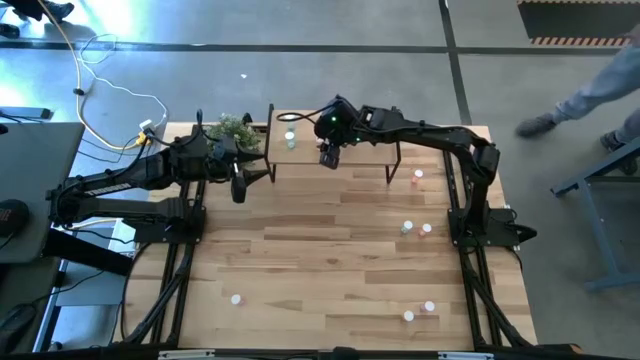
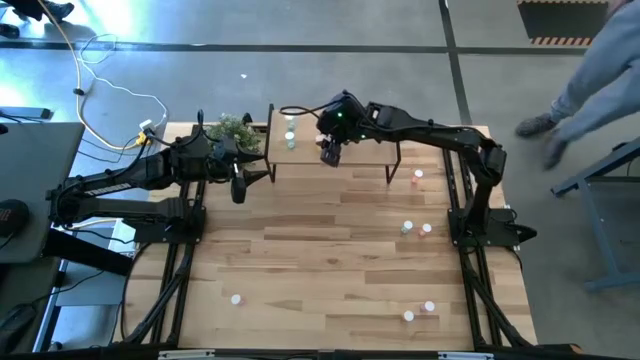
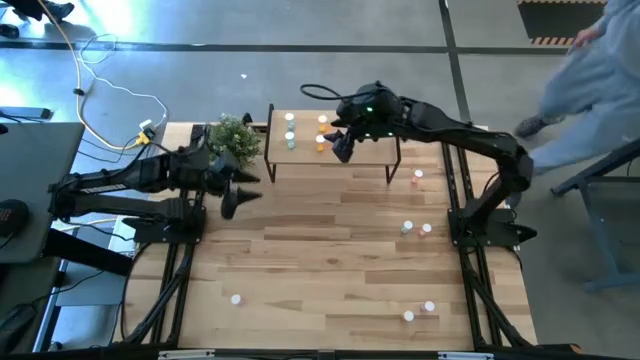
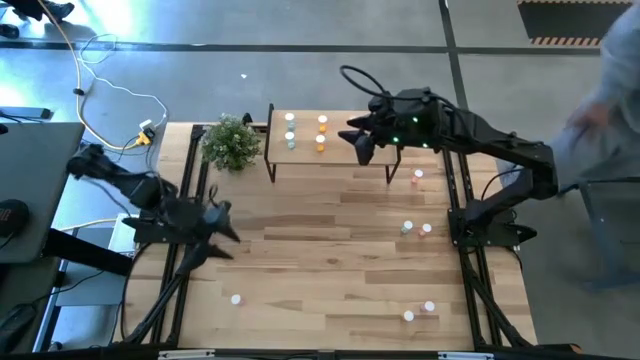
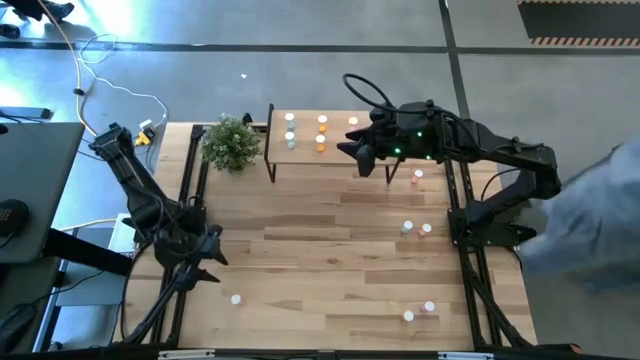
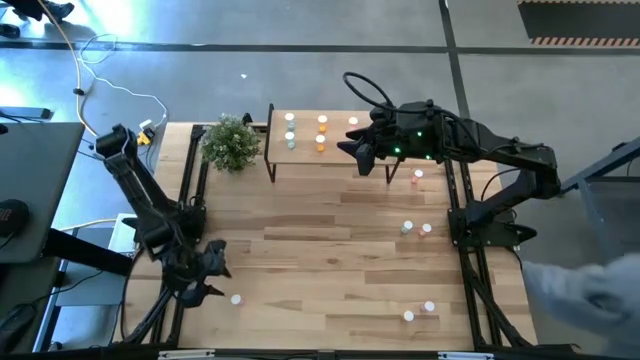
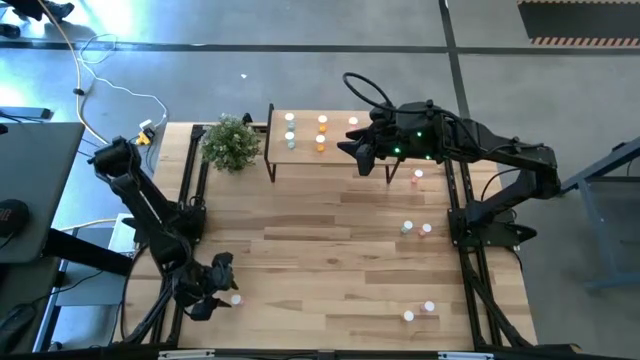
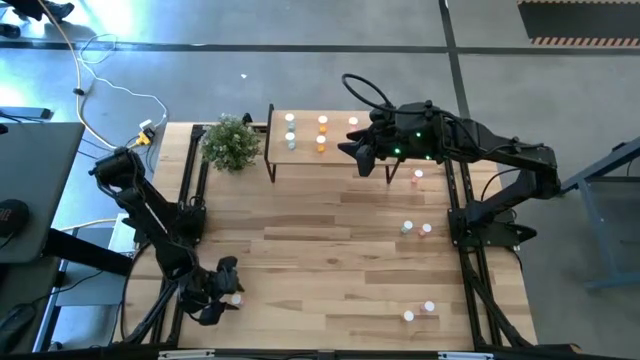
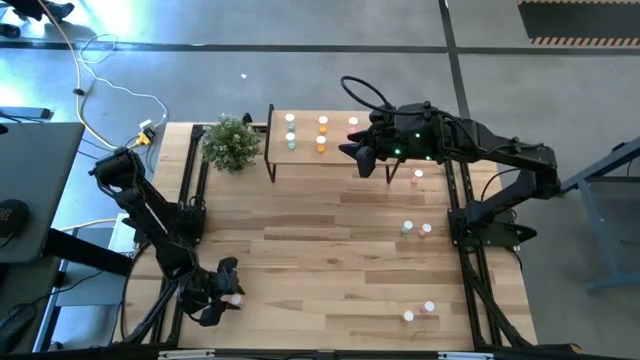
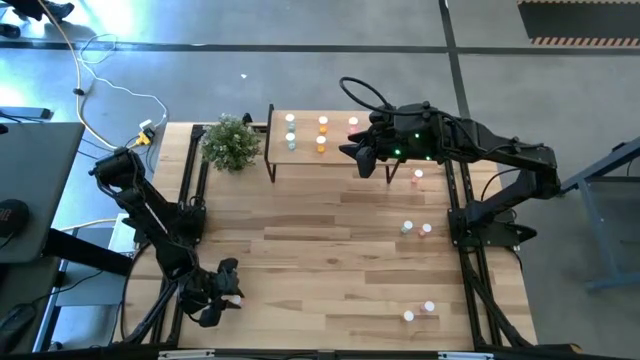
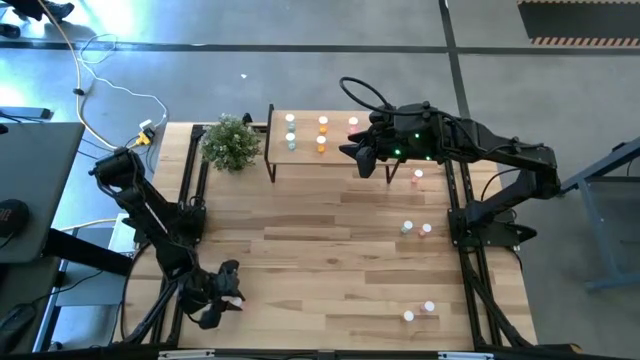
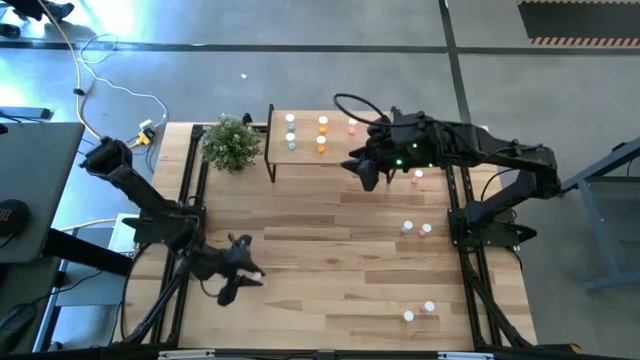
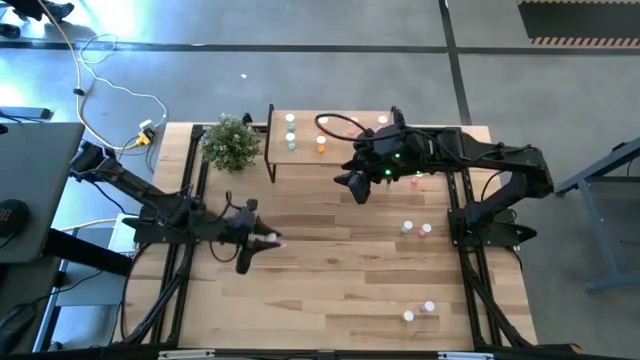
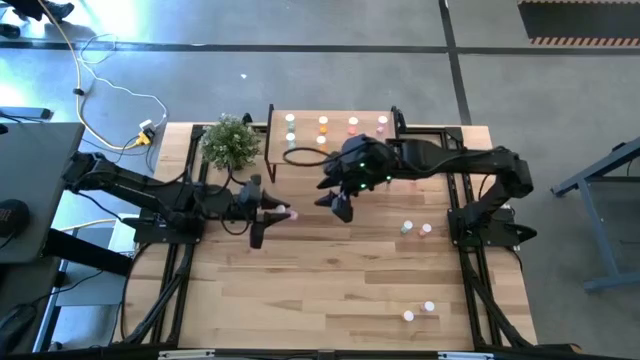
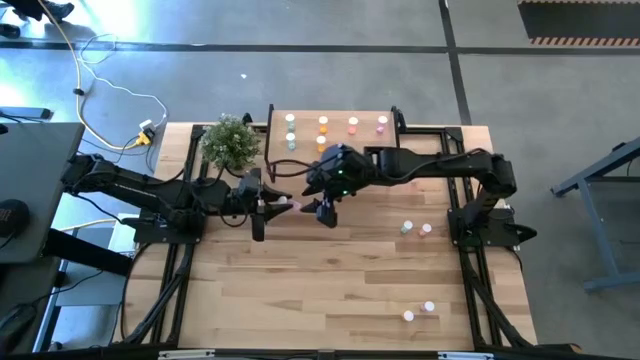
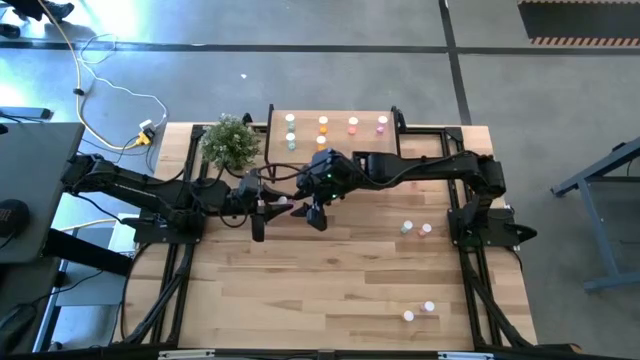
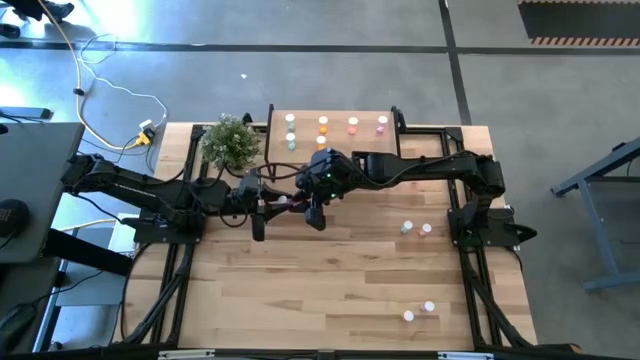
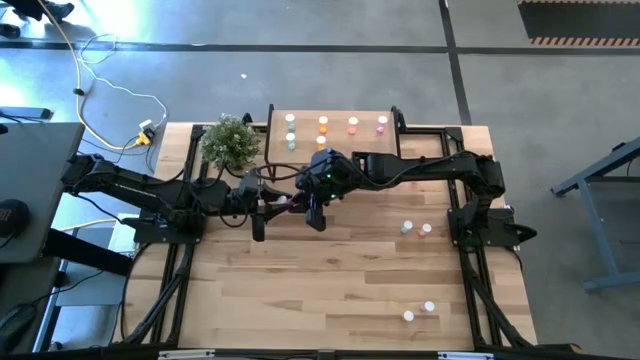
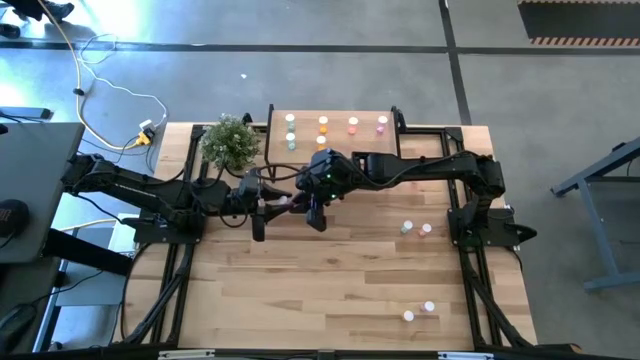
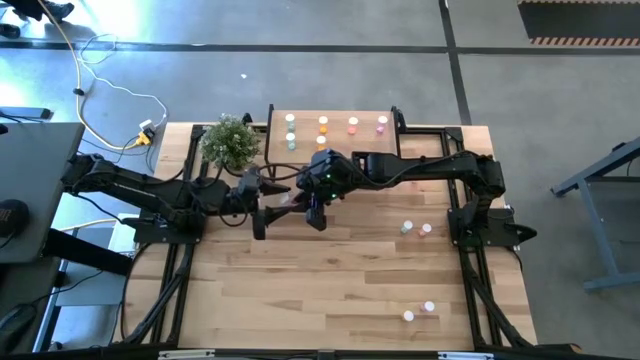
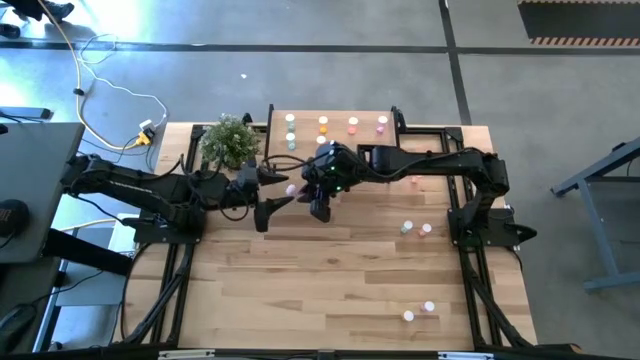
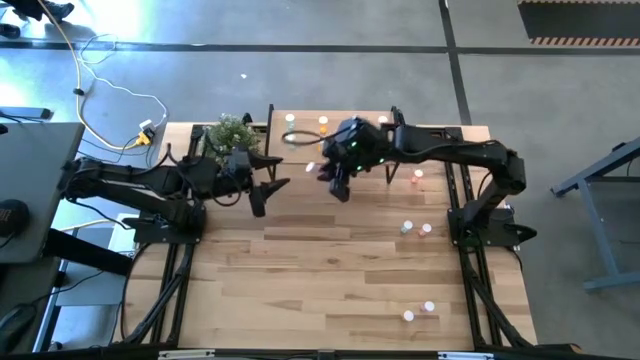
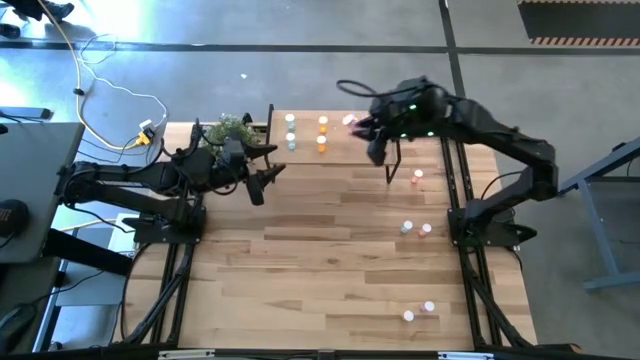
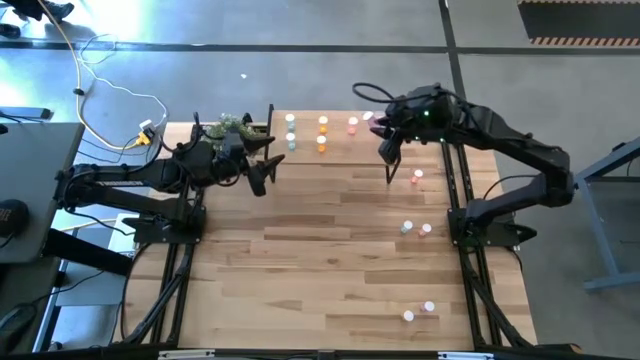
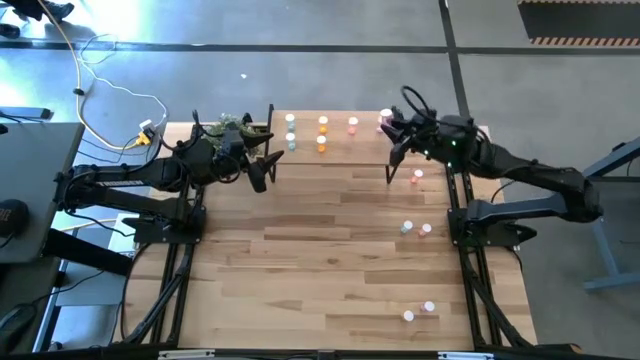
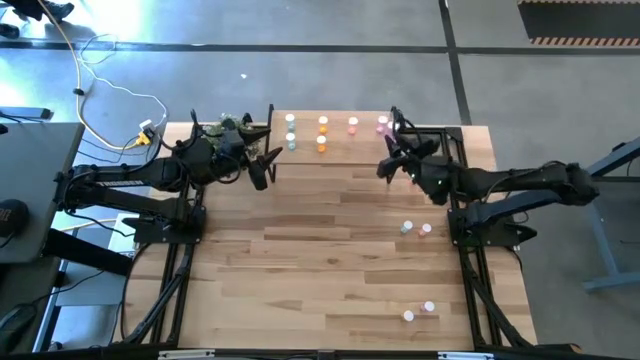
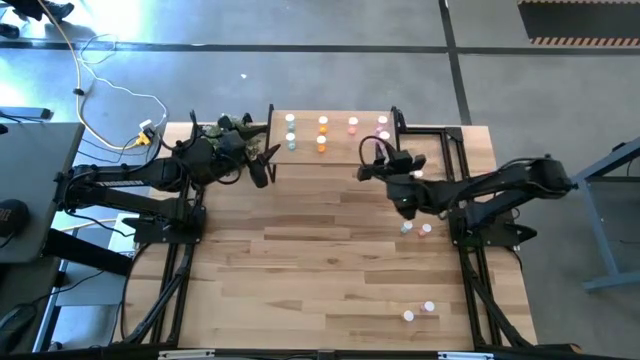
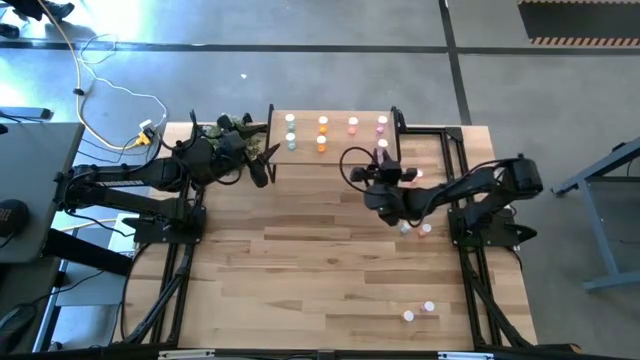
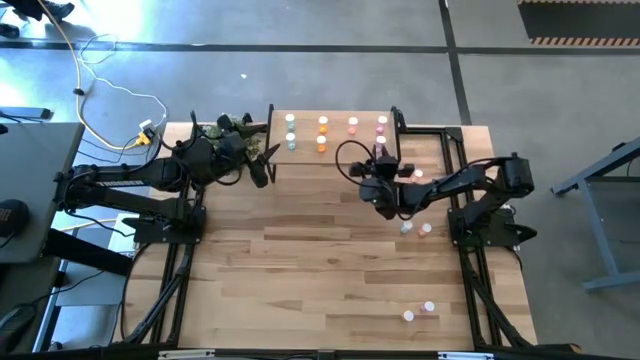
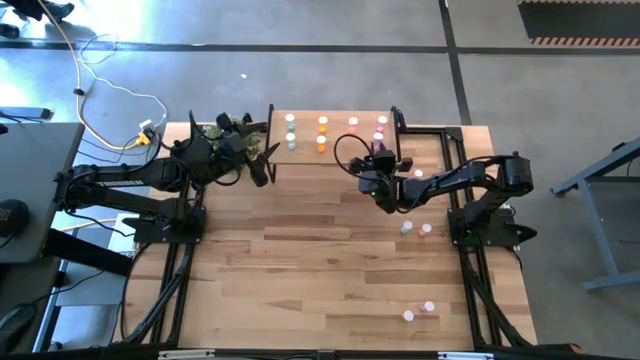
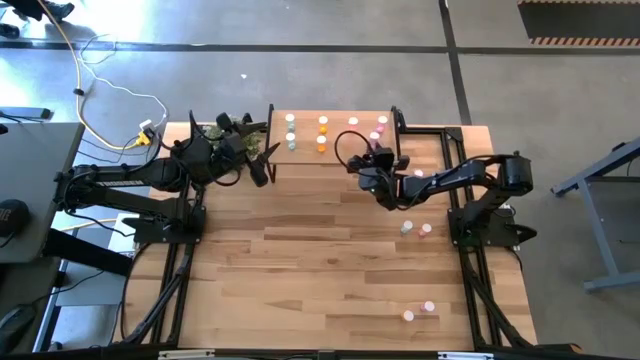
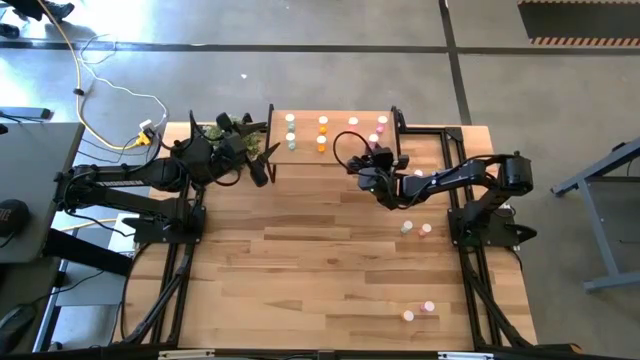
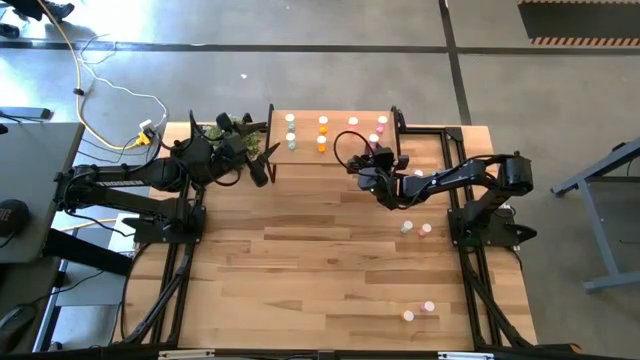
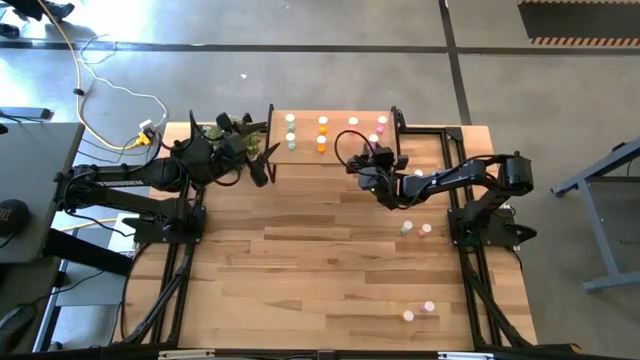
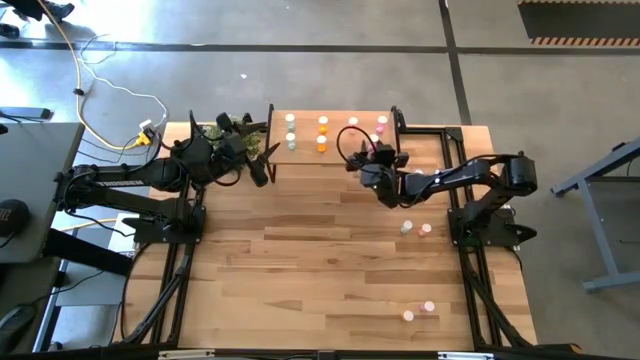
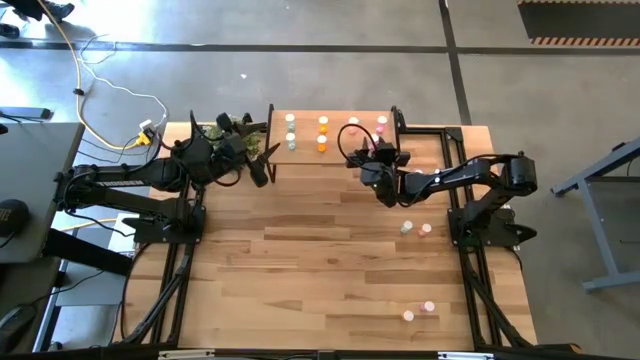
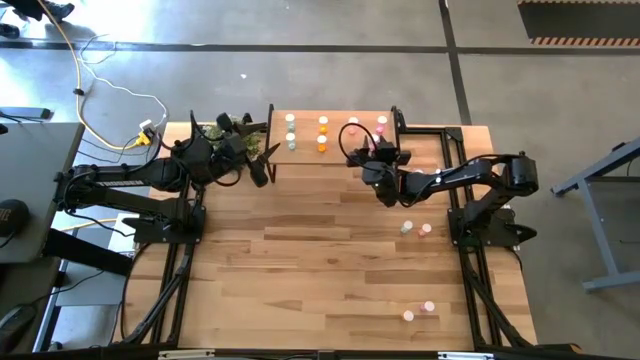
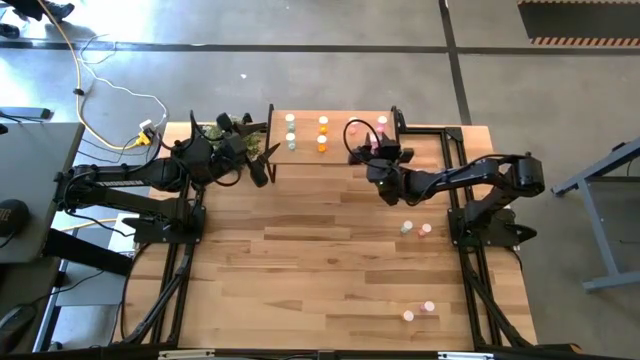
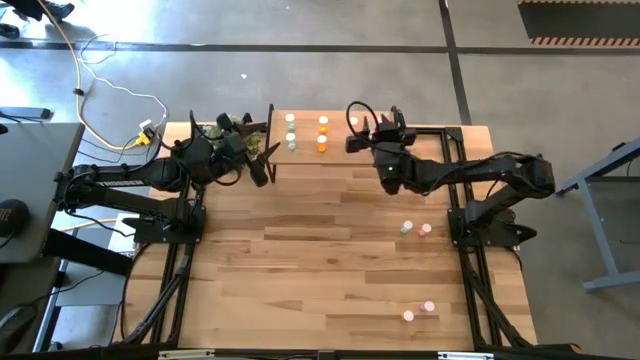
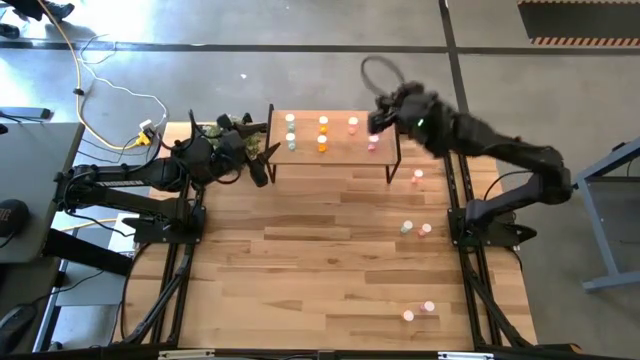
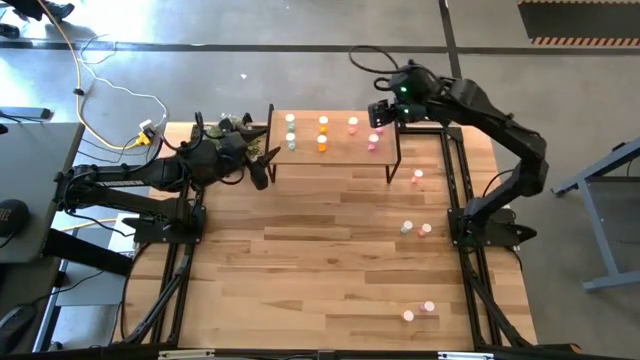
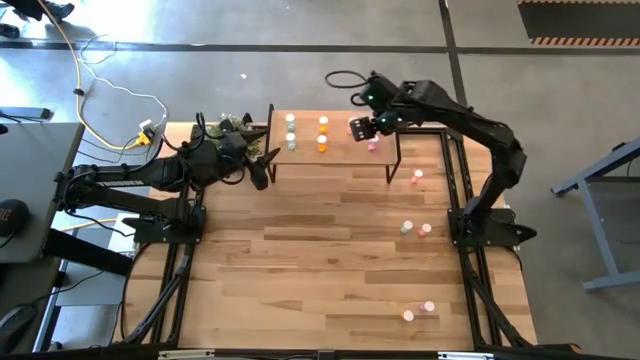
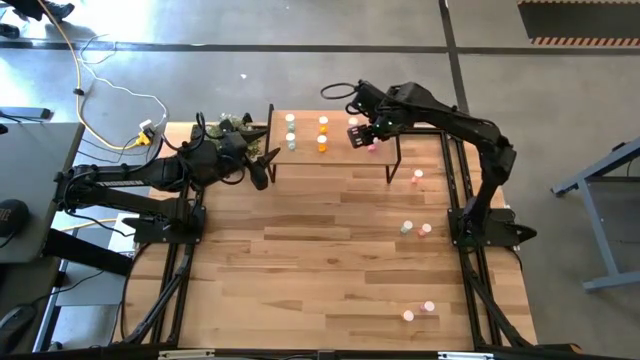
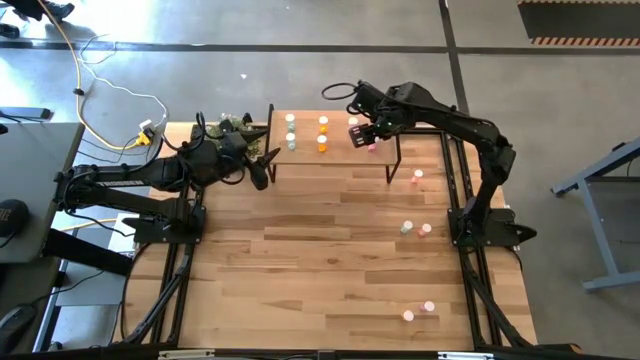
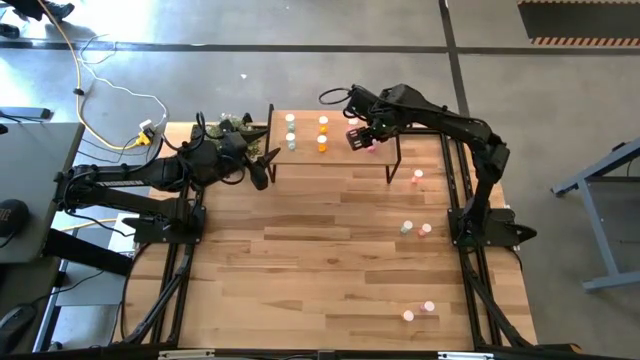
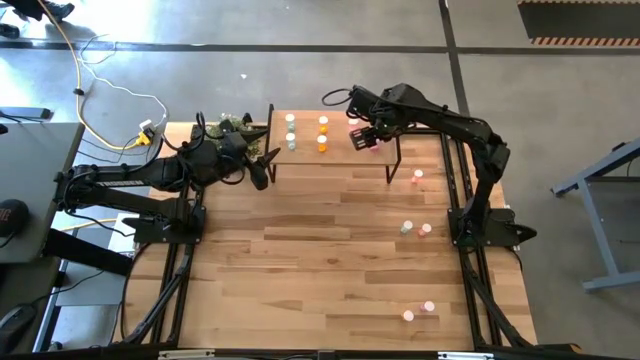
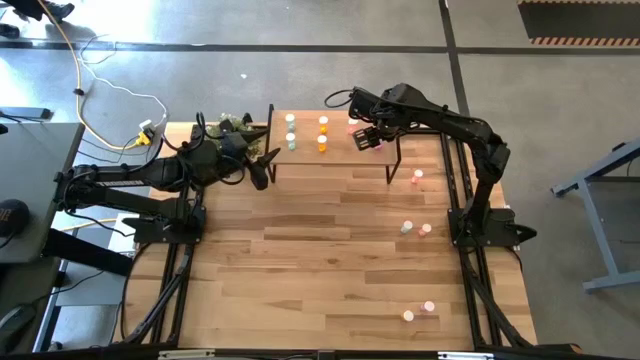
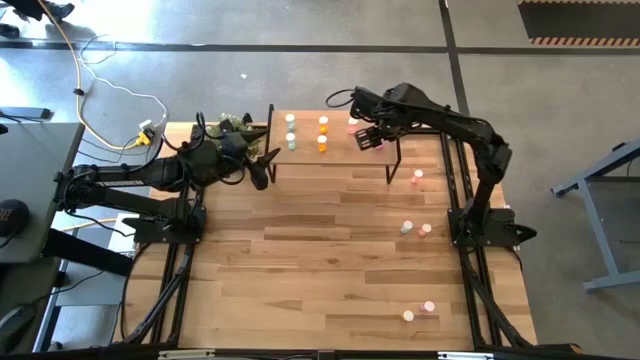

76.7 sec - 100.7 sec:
Task: Pick and place medicine bottles onto shelf by color
Put the left violet pill bottle on the shelf aligned with the other violet pill bottle
